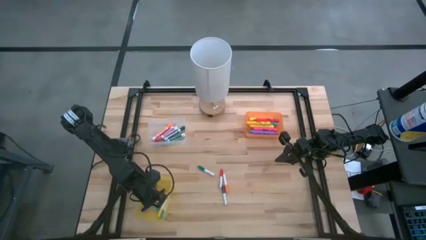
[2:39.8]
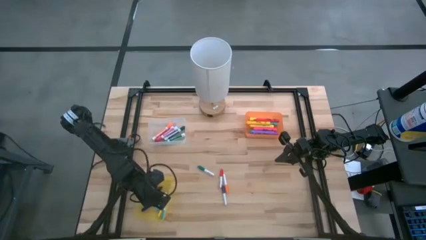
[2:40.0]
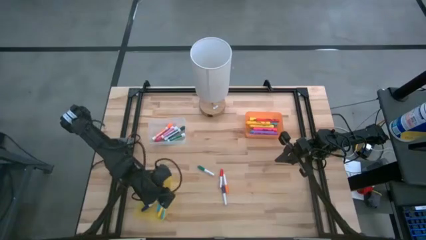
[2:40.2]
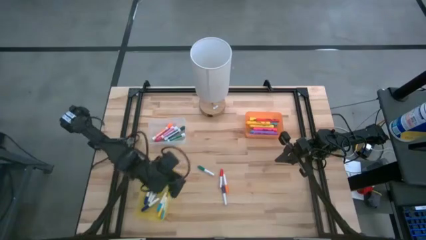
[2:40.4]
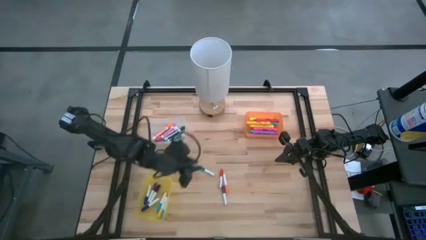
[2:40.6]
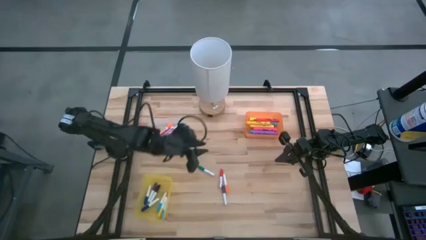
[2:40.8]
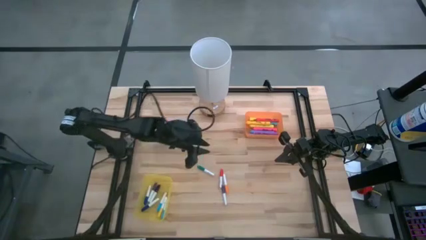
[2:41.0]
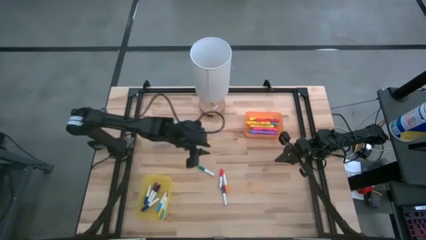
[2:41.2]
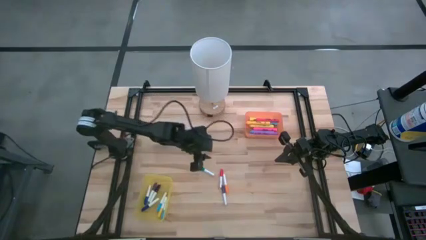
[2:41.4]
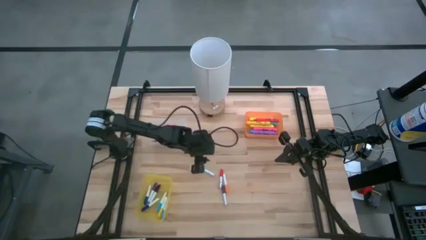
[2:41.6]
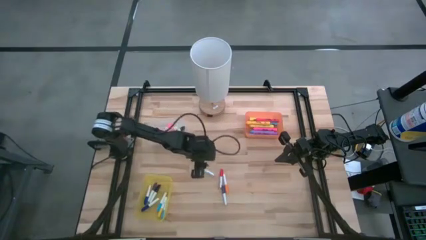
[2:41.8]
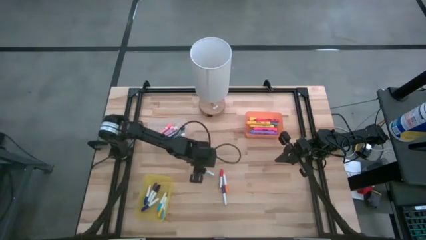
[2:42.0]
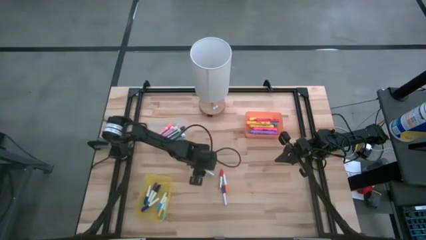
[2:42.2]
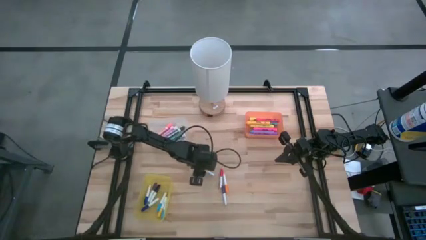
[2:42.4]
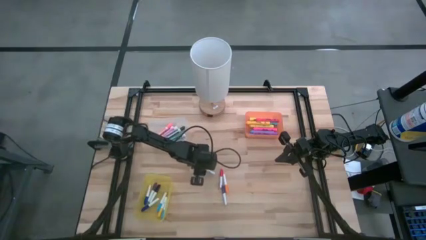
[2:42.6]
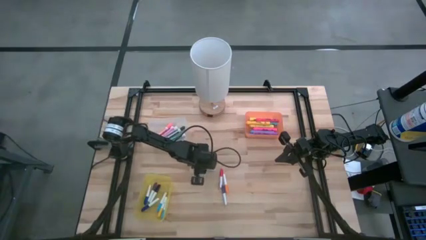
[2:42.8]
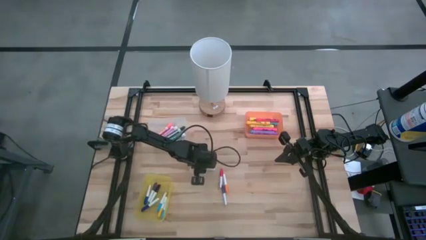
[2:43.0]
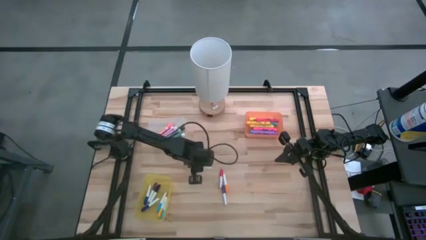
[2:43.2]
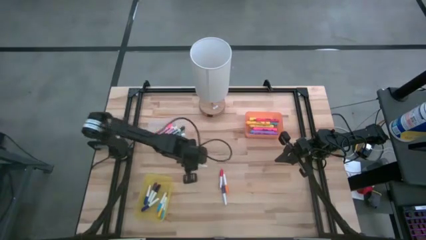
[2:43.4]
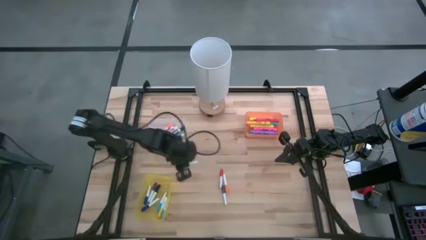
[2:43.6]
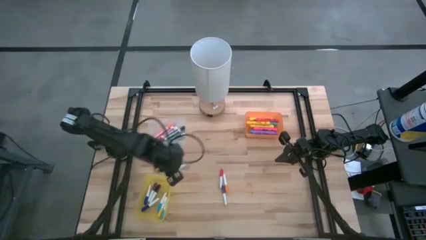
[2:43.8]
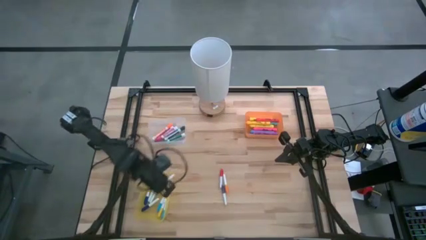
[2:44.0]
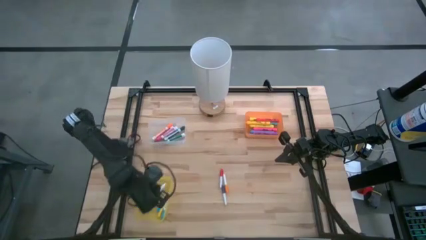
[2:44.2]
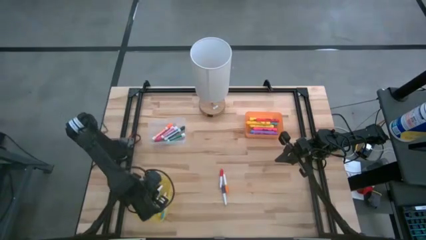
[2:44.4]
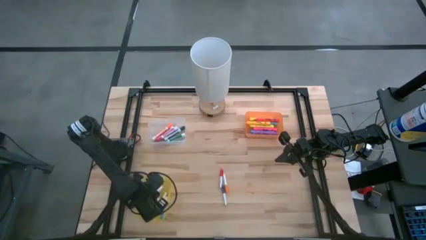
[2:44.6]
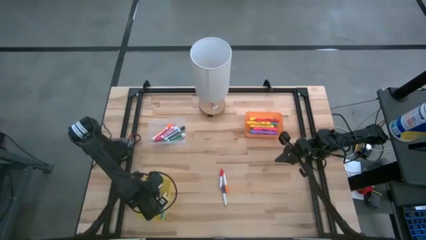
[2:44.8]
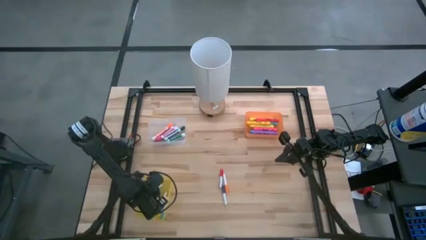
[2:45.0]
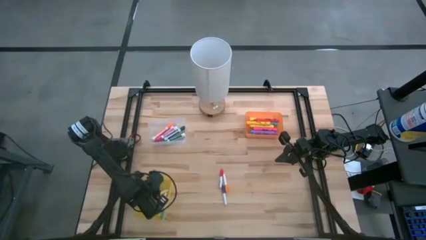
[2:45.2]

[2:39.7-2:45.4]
Task: Pick & Place Markers
Put the small green highlighter pen into the yellow bin

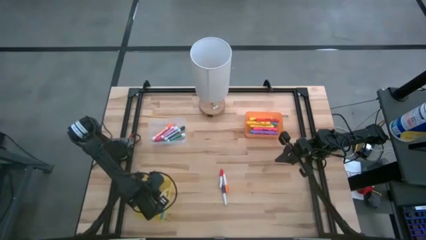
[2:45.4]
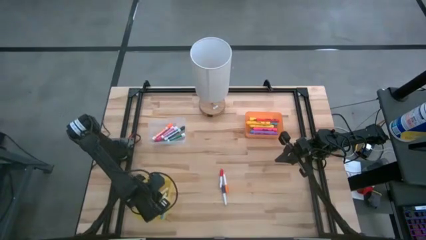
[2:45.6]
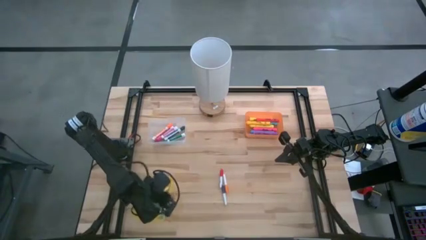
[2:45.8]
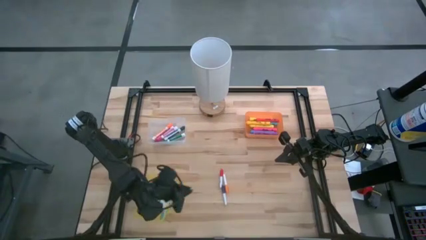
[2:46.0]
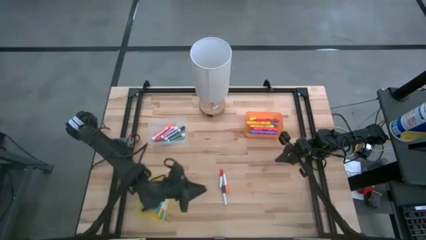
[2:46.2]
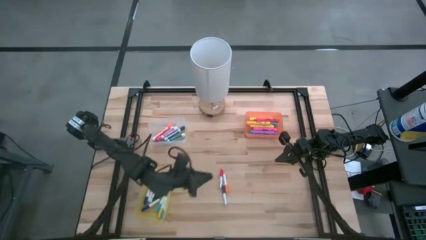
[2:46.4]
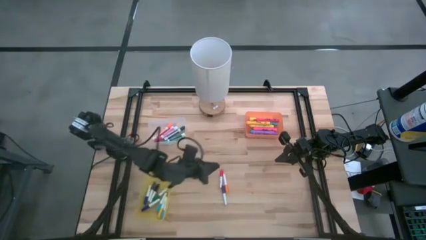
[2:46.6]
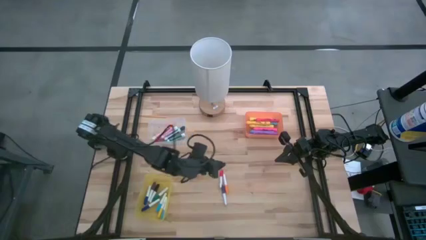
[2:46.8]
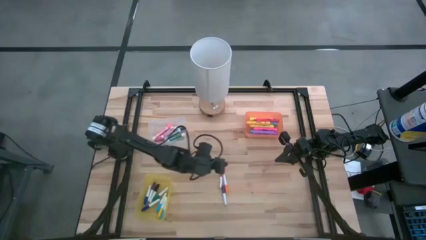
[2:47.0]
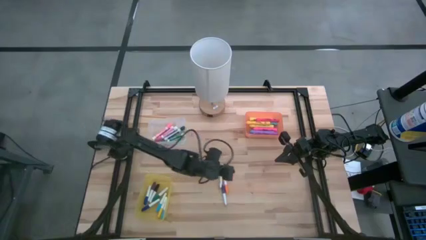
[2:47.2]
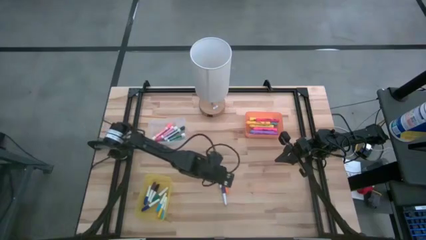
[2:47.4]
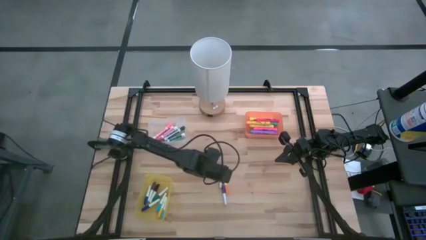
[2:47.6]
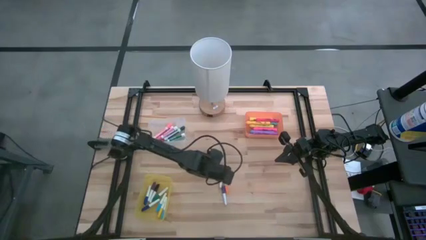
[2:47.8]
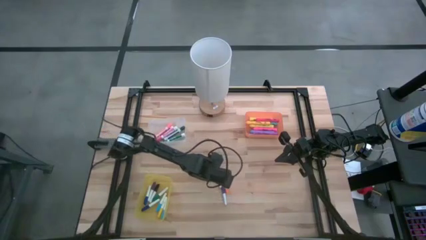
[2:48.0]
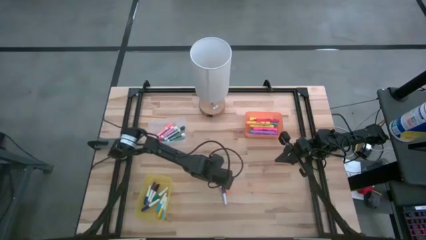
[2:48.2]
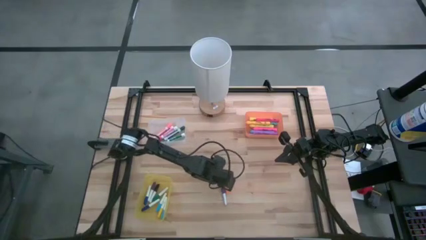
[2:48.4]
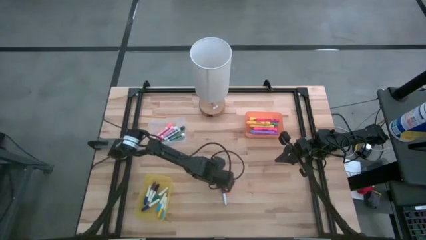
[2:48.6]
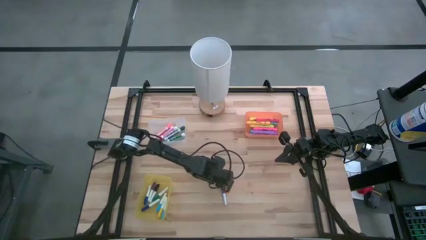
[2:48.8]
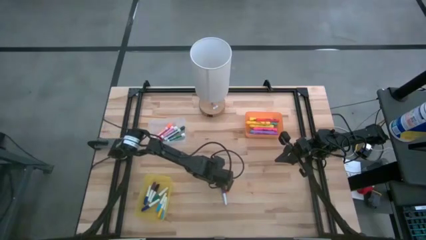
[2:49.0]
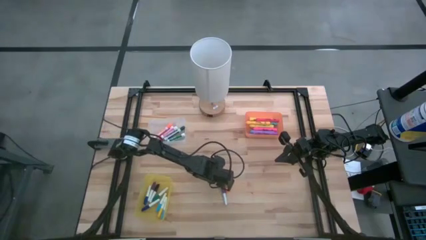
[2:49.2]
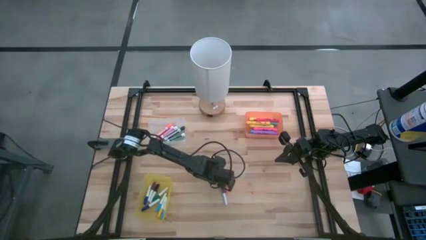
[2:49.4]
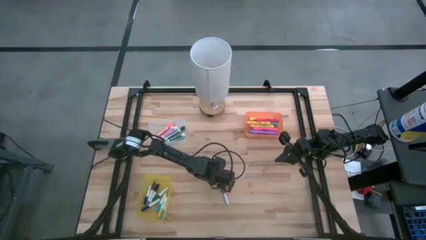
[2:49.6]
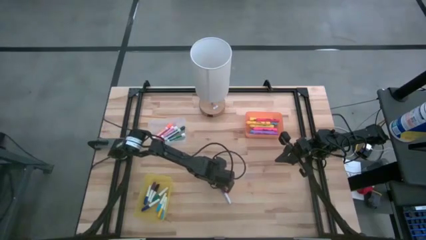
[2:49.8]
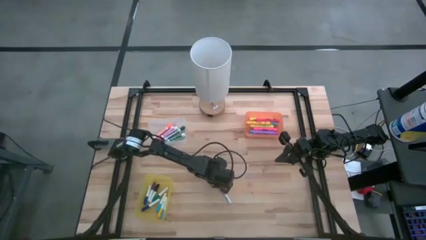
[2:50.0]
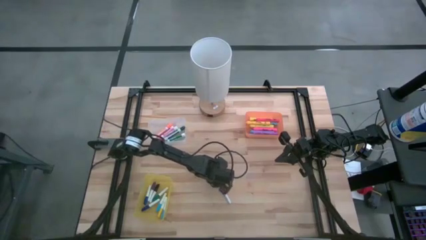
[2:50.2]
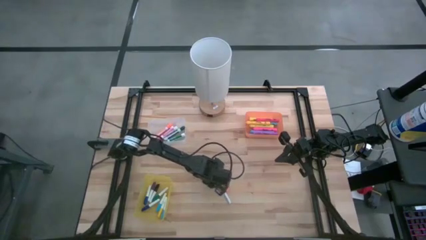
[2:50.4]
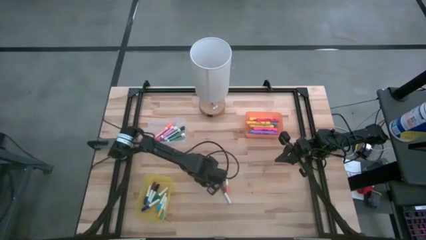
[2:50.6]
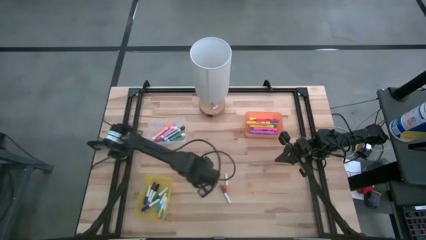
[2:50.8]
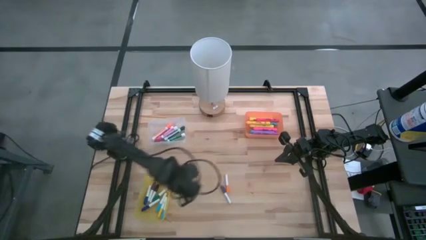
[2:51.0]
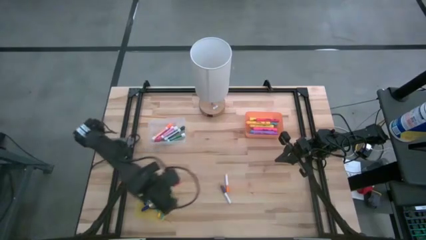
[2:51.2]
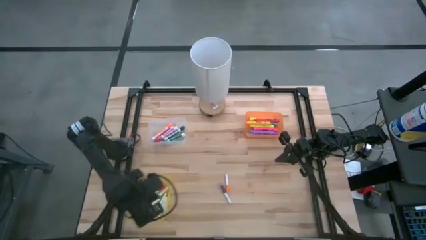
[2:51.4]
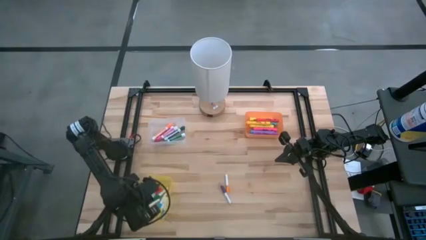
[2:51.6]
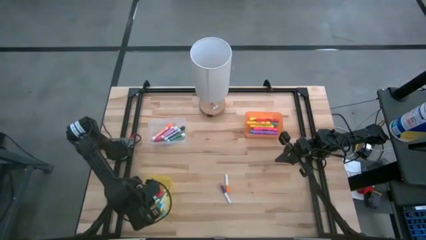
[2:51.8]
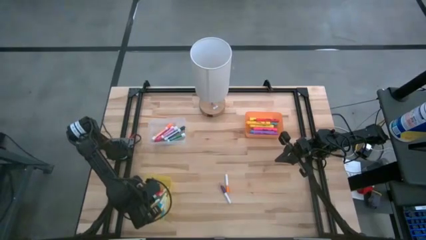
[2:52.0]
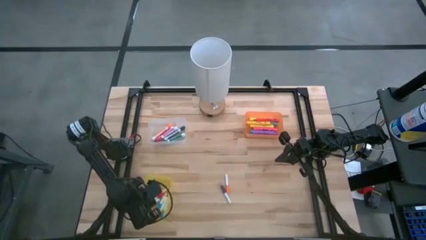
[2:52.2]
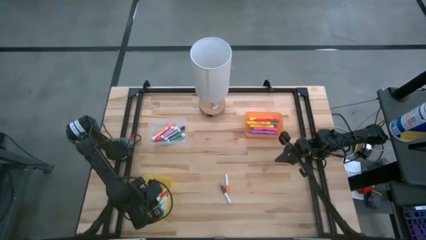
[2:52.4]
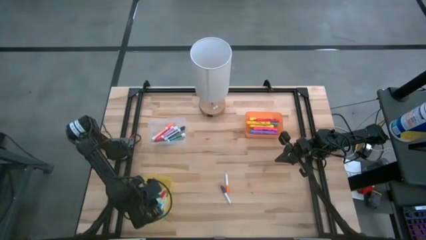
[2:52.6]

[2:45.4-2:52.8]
Put the small red highlighter pen into the yellow bin
